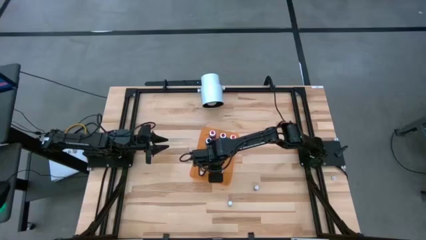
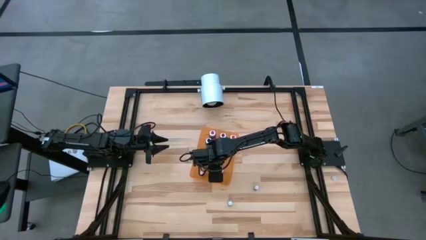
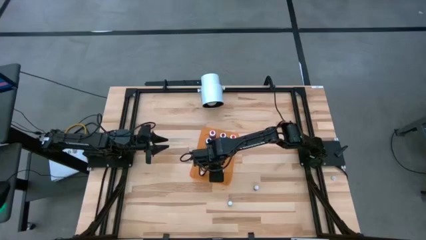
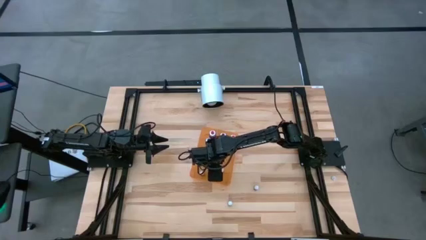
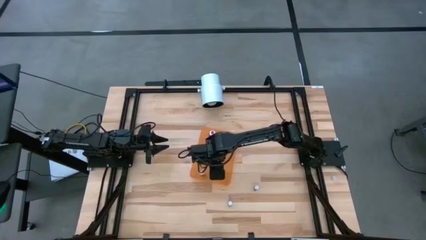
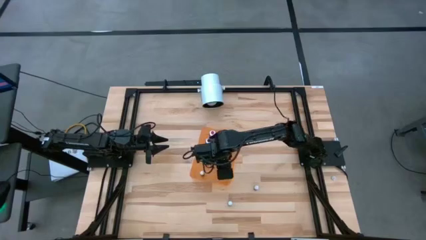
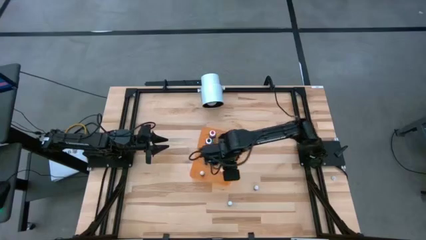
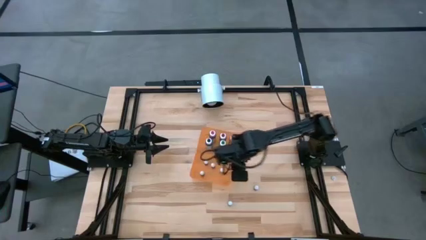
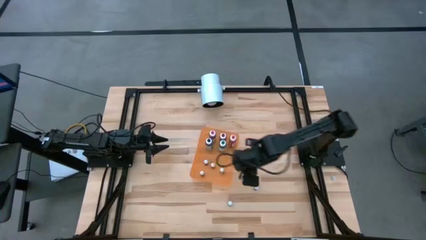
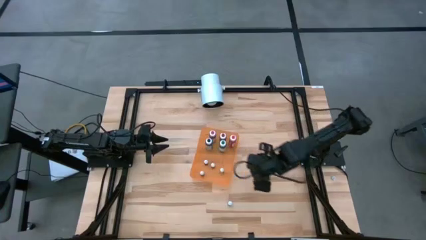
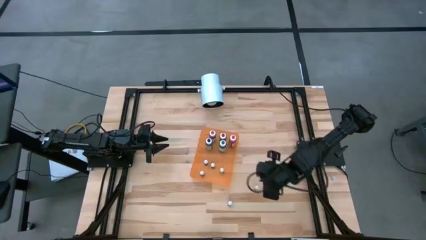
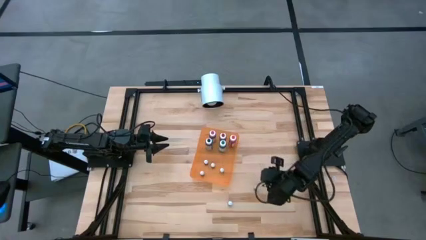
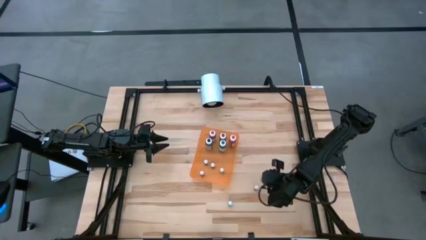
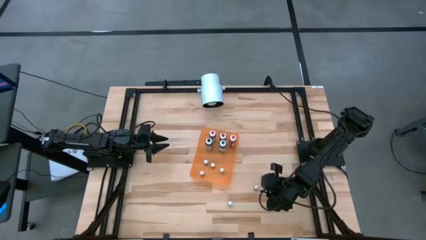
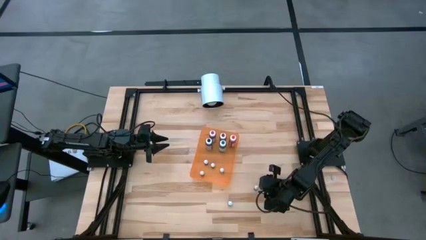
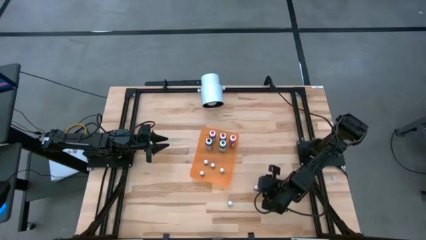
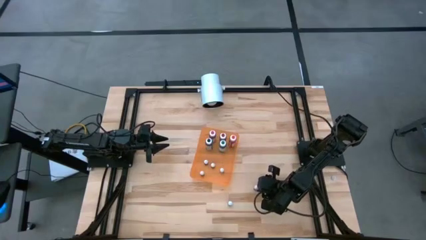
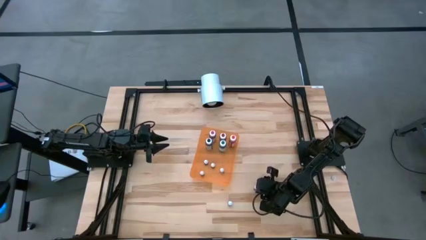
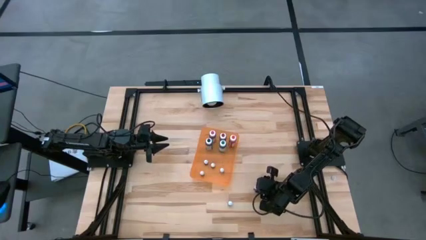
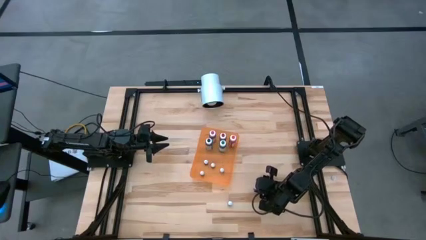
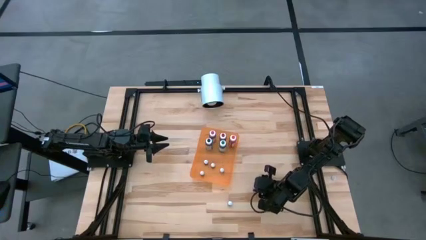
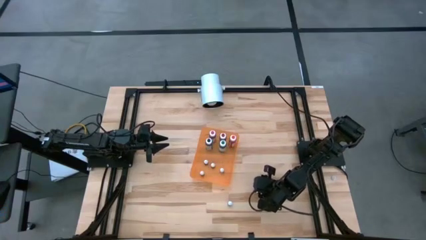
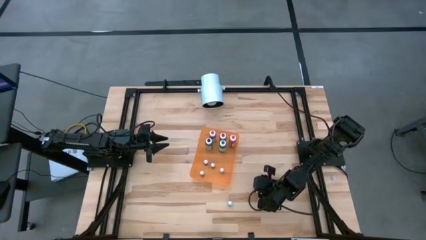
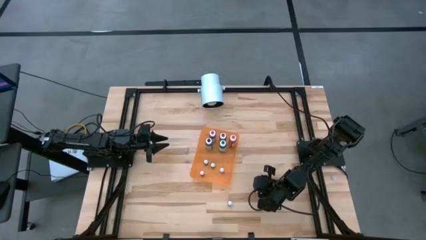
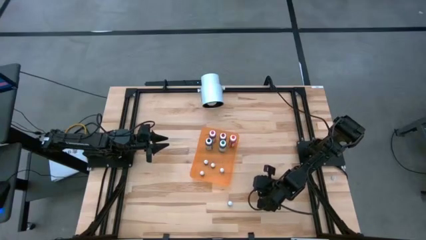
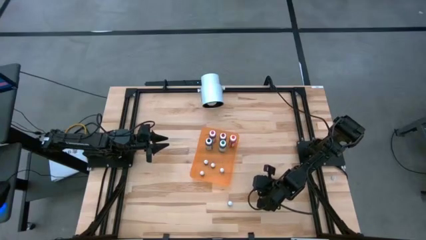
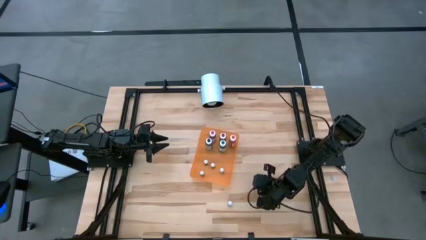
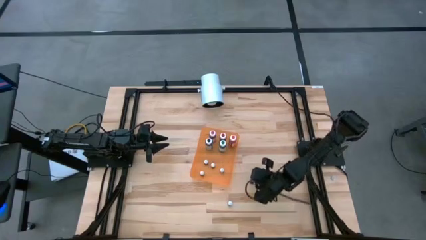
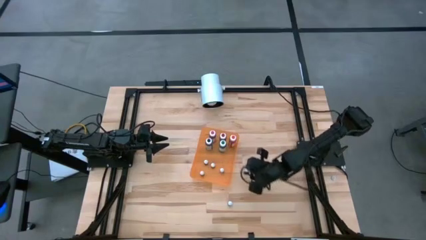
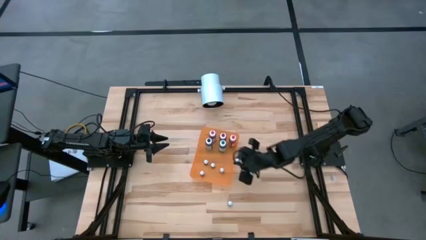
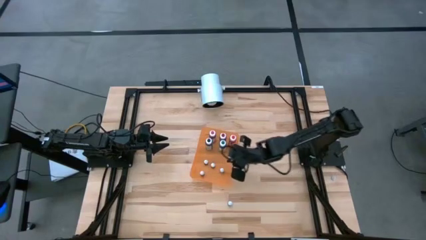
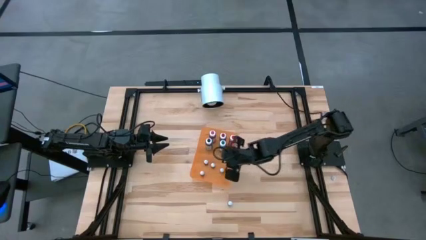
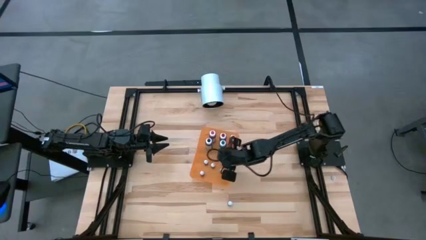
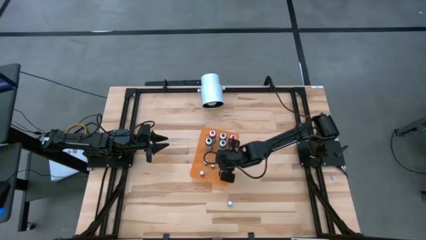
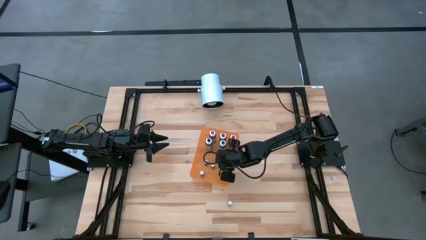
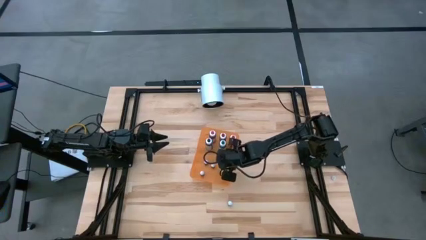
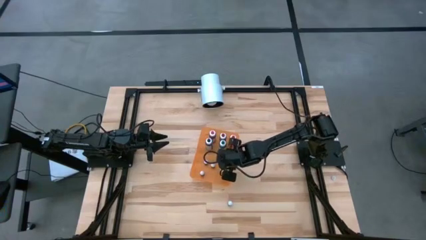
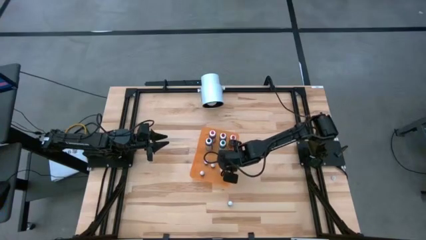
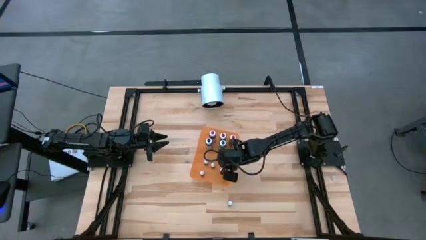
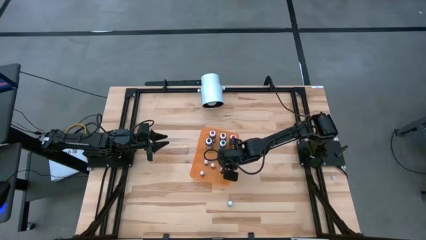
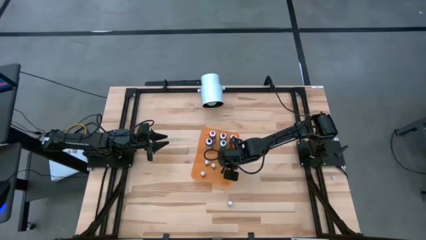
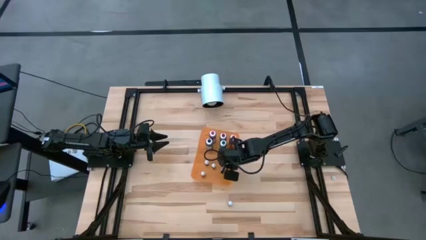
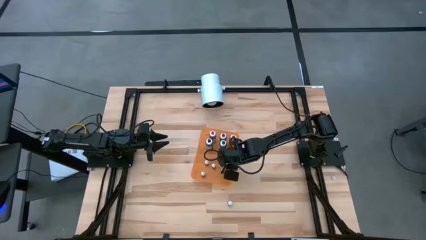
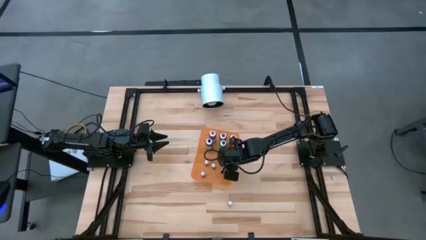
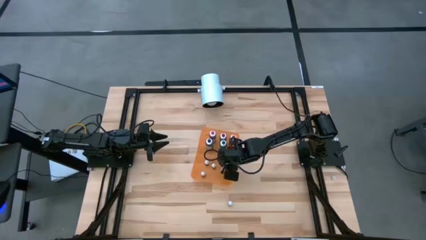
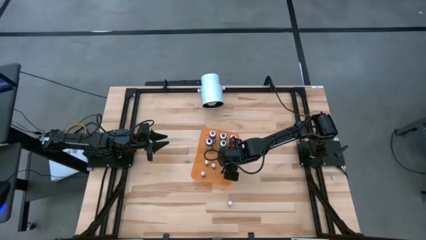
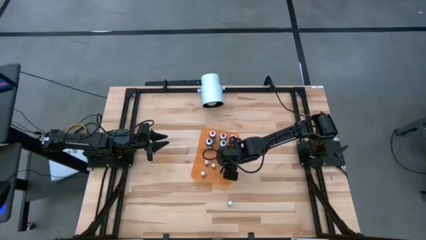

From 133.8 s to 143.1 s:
Task: Pick & Place food coloring
Put the small blue food coloring bottle into the orange bin

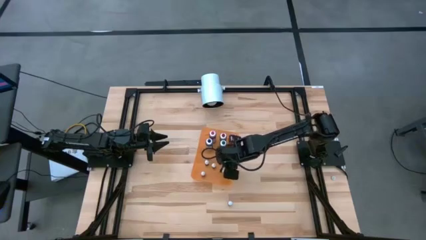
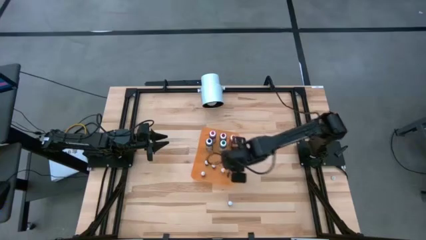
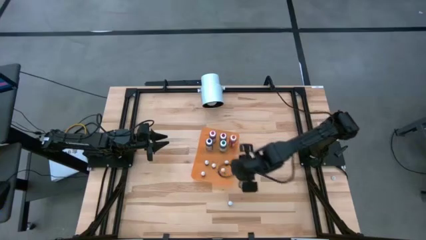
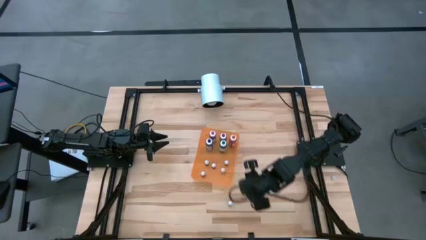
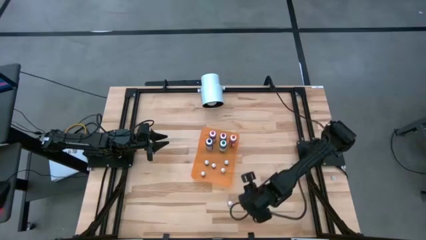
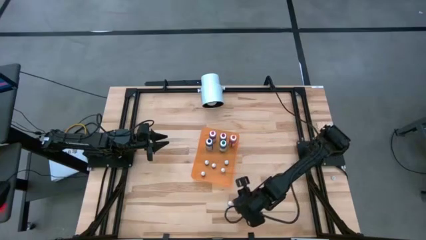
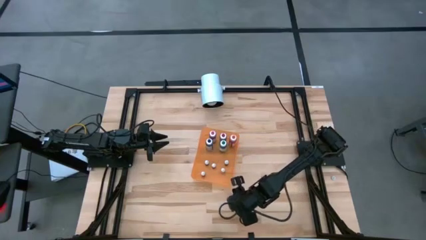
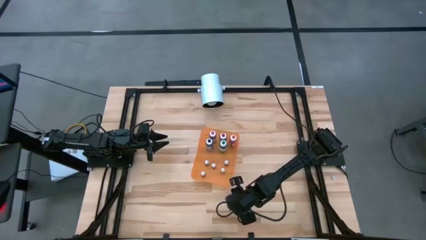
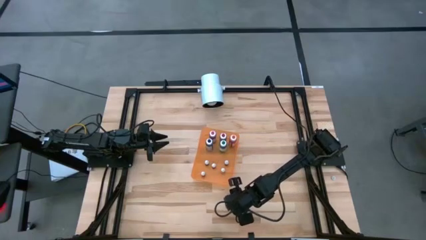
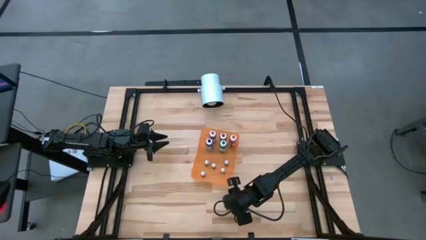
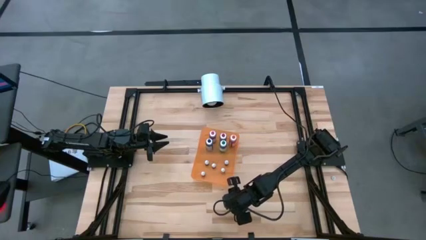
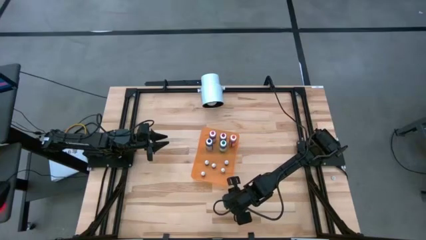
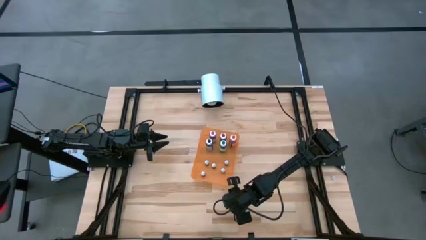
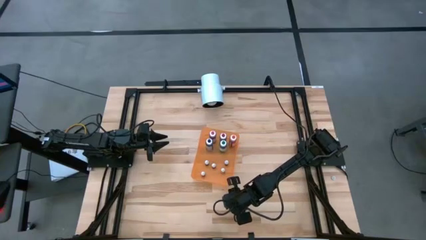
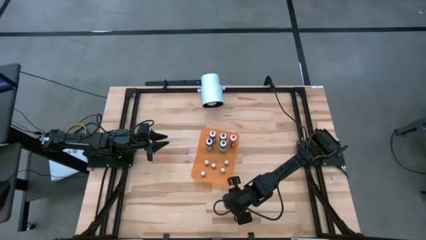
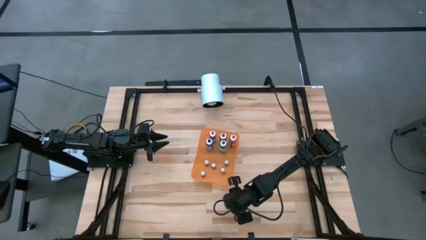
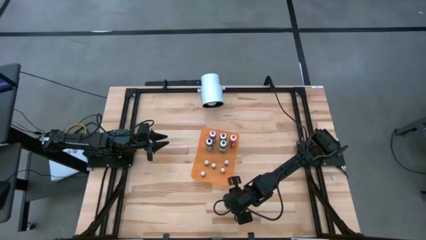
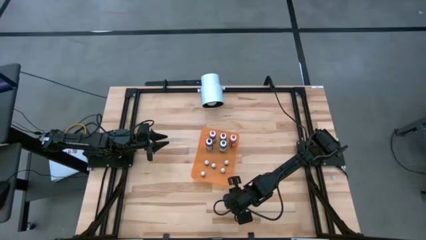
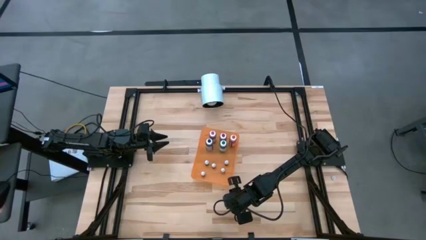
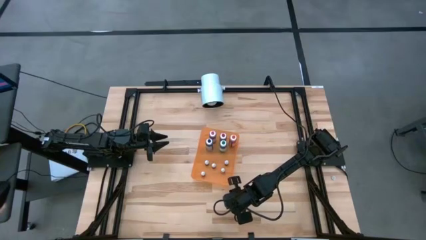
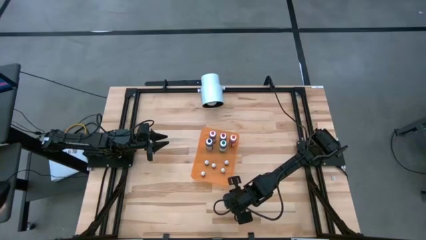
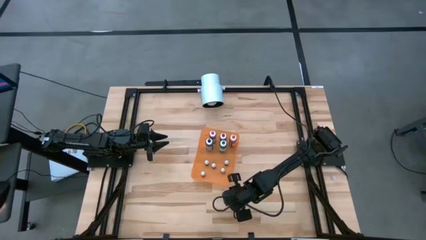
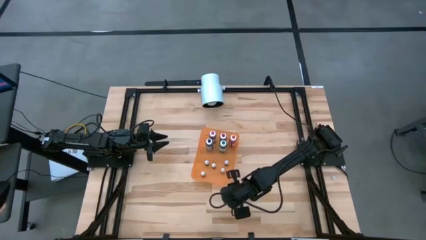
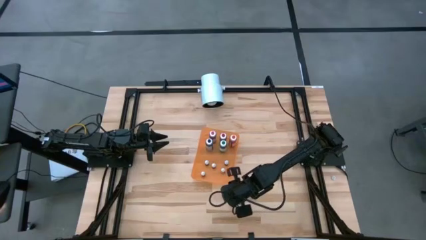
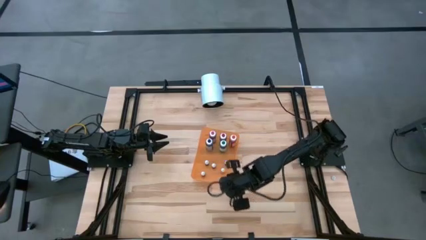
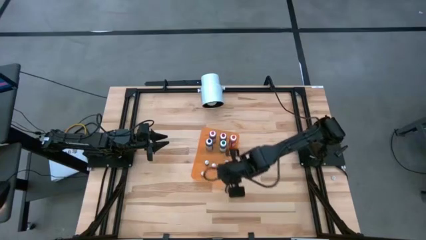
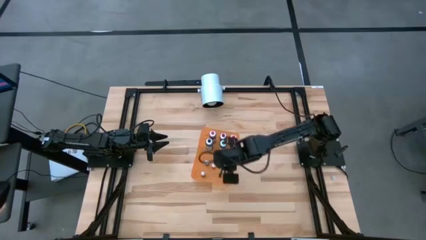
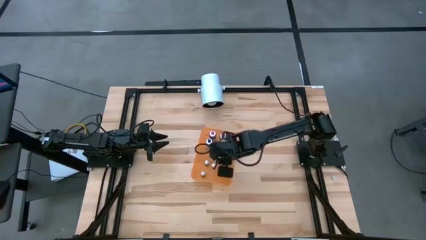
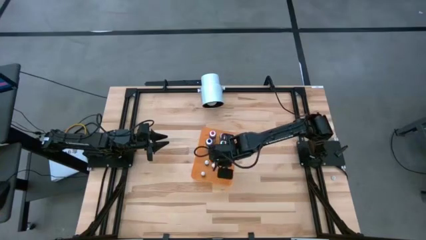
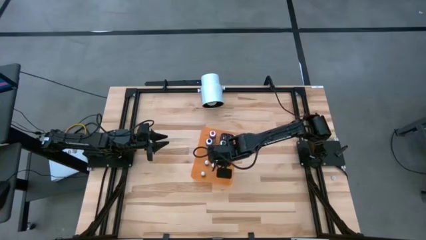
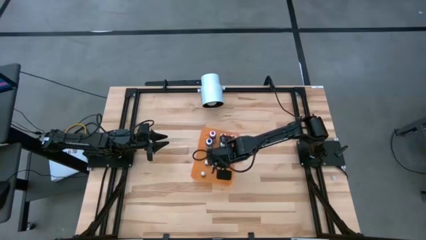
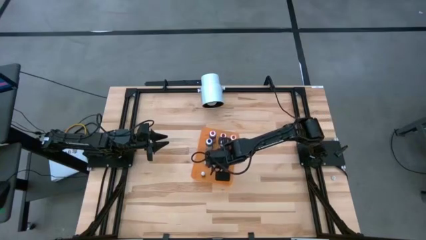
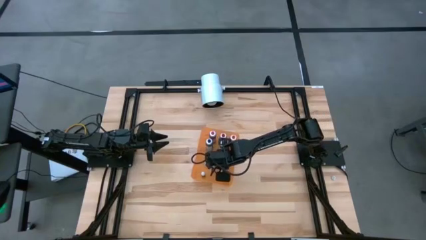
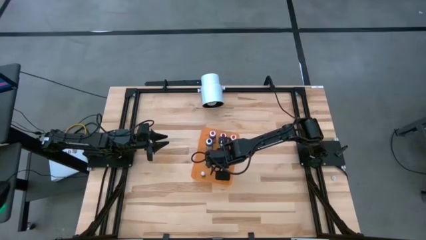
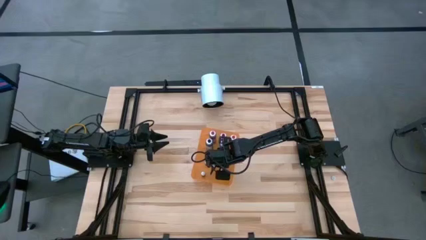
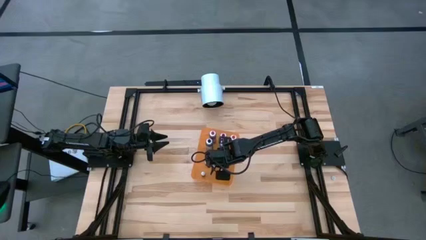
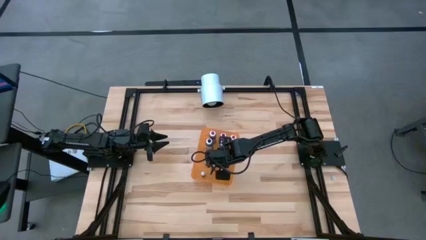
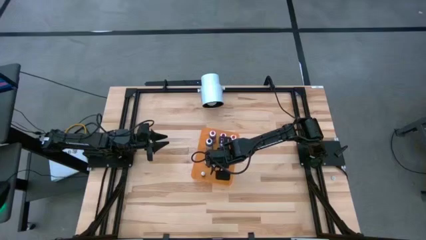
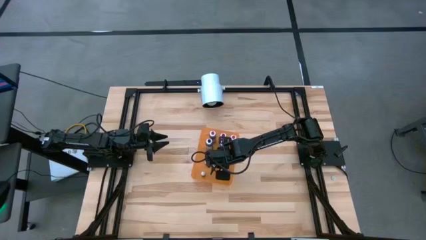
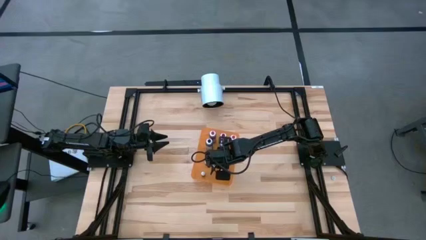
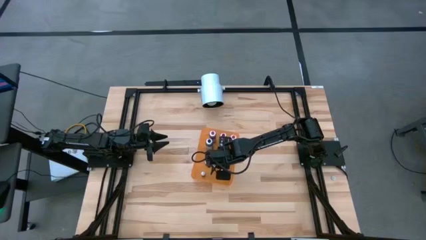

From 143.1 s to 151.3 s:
Put the small green food coloring bottle into the orange bin
